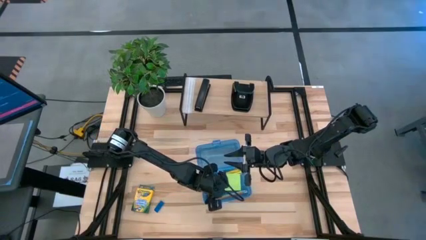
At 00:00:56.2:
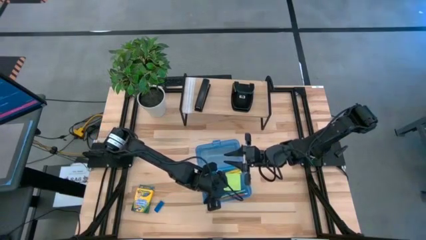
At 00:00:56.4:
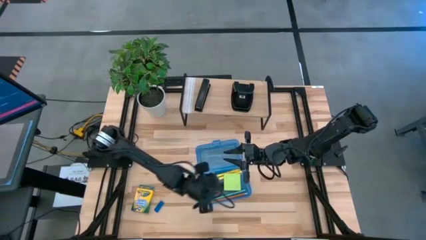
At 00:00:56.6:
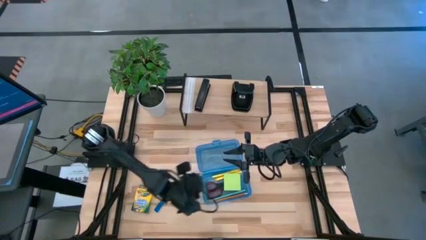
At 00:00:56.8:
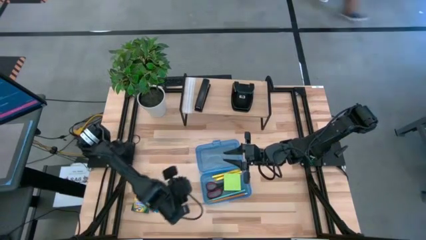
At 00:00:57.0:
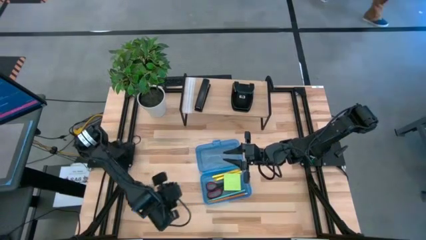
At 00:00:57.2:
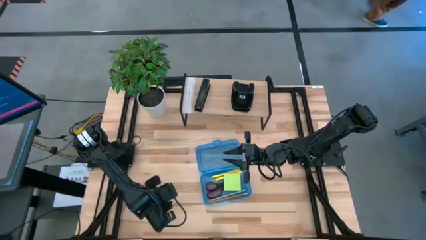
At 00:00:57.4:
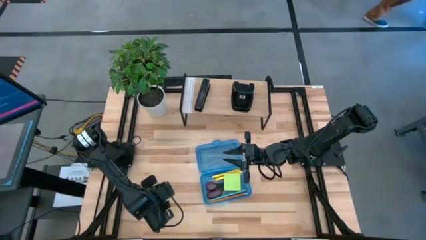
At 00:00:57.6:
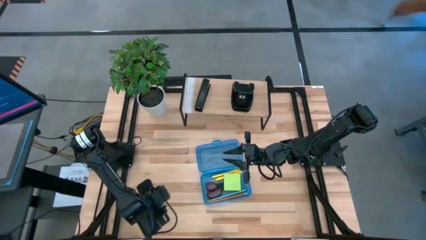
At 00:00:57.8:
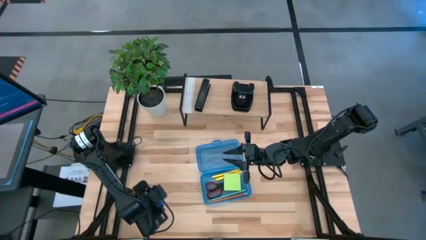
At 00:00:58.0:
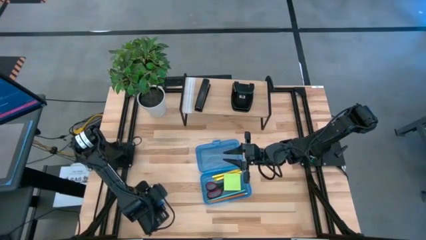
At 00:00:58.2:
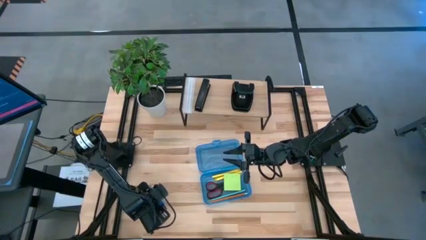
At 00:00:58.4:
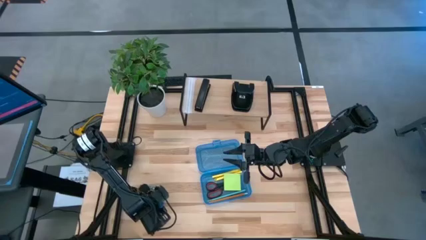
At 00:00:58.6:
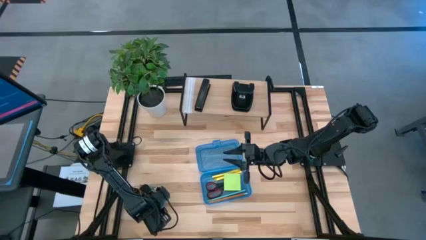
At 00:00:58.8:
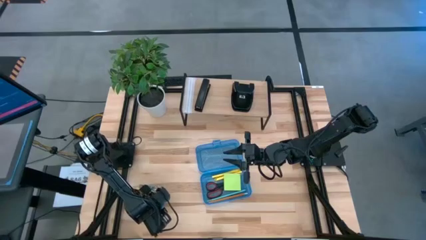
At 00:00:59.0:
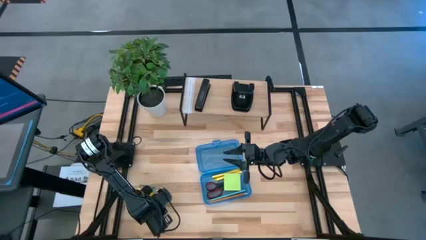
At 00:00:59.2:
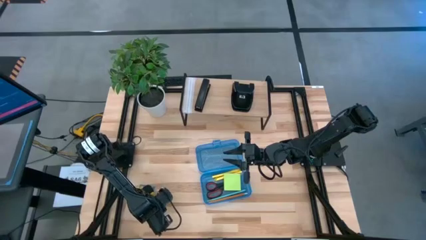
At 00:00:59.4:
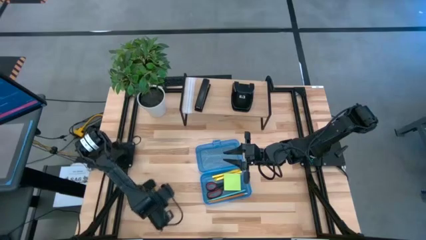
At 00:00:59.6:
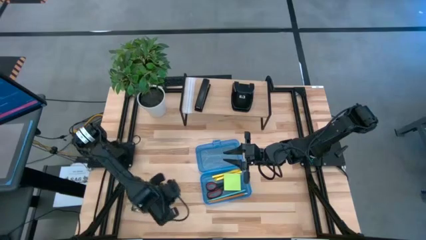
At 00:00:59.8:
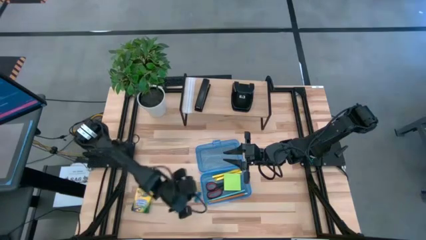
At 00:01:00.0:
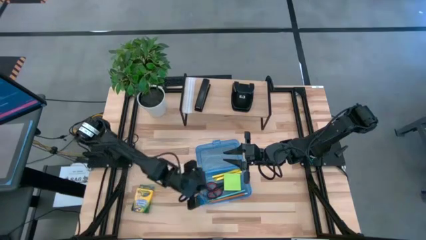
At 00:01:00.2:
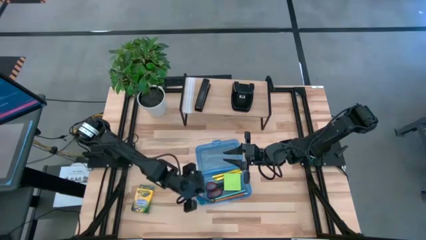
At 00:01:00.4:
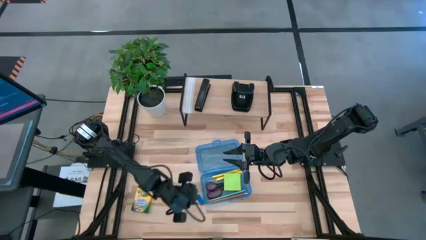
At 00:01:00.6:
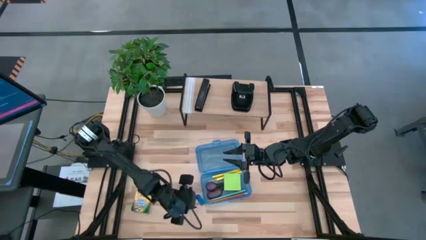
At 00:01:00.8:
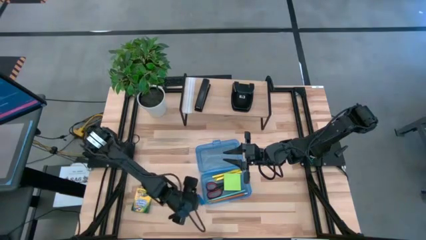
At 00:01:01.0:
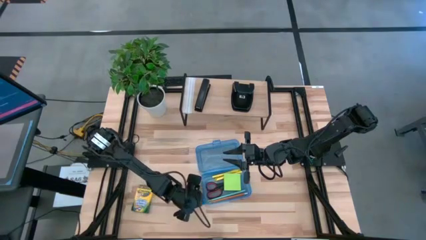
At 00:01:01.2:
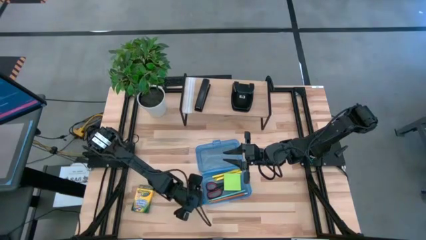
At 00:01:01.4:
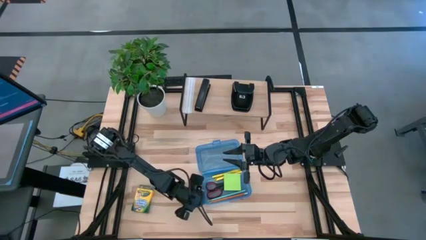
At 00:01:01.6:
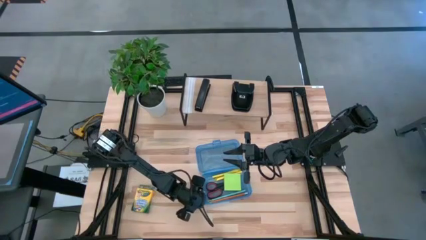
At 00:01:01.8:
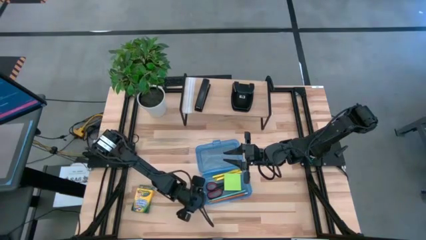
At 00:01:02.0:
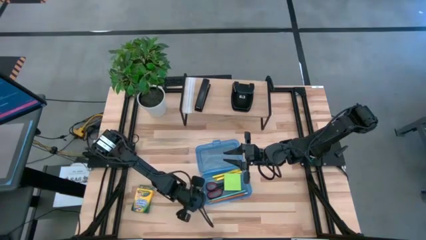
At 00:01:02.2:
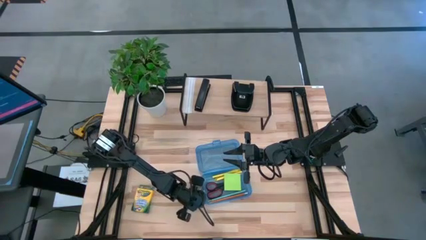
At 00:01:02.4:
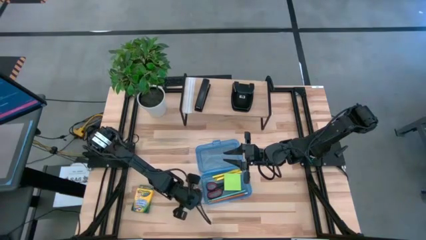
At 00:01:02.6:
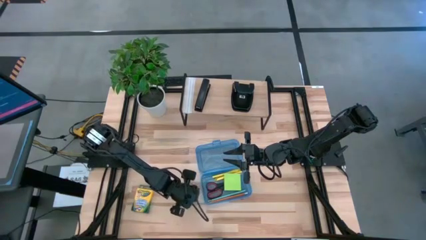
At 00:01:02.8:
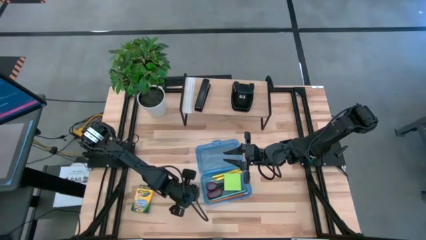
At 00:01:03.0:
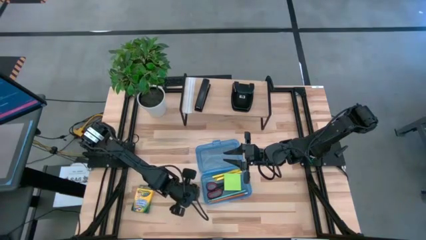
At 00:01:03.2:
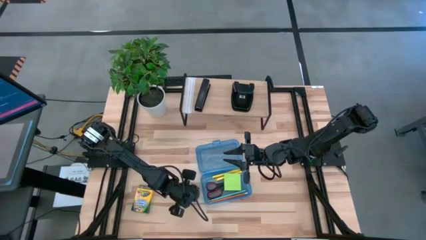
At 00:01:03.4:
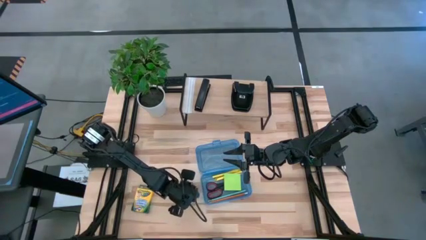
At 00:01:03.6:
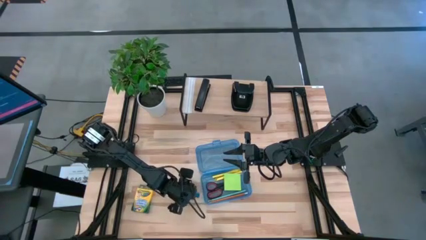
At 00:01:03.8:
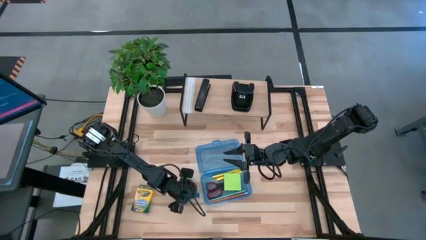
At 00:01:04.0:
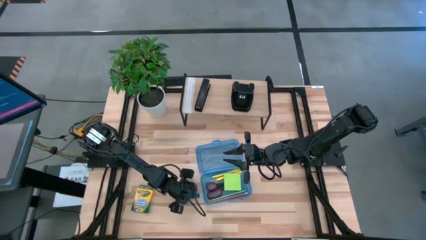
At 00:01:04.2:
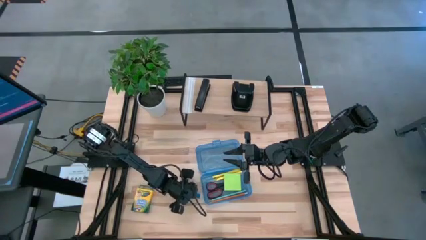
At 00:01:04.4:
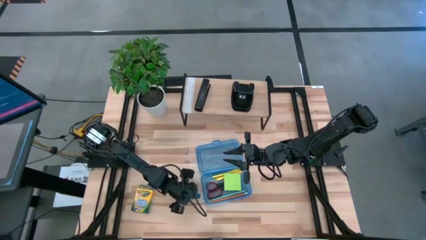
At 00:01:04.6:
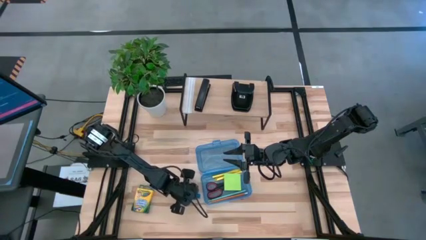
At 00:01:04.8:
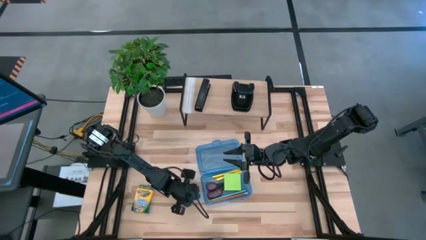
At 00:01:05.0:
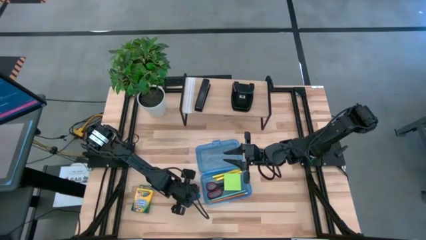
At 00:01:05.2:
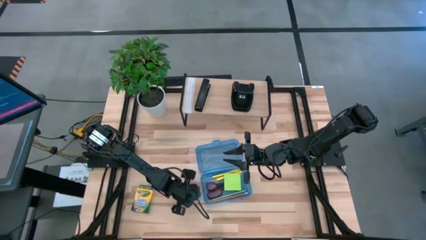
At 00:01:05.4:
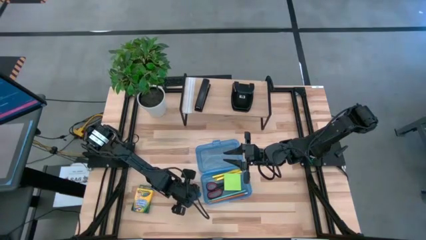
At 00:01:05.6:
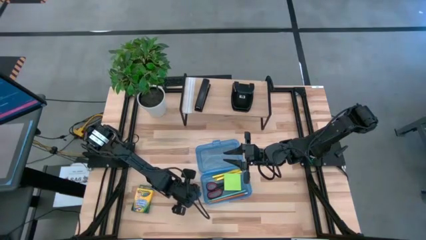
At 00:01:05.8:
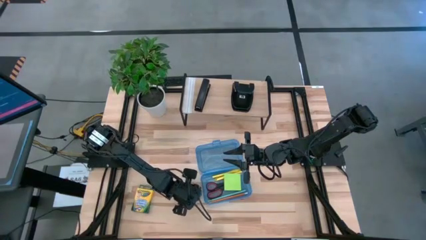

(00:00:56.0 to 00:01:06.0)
Task: Pack school essentials
Put the blue eraser into the blue supply box

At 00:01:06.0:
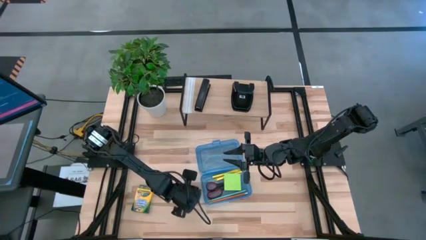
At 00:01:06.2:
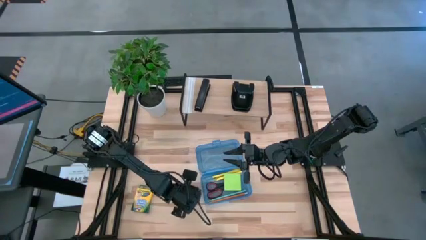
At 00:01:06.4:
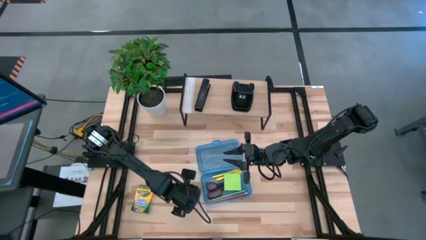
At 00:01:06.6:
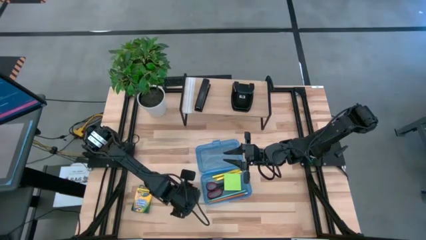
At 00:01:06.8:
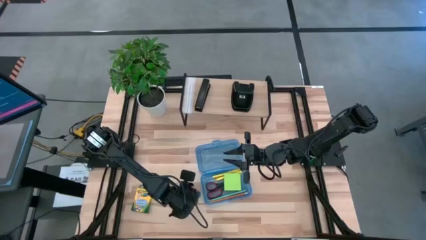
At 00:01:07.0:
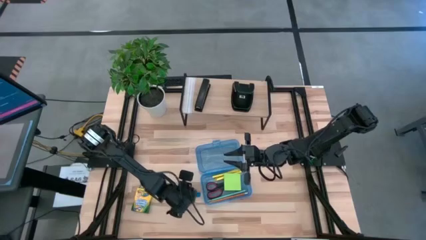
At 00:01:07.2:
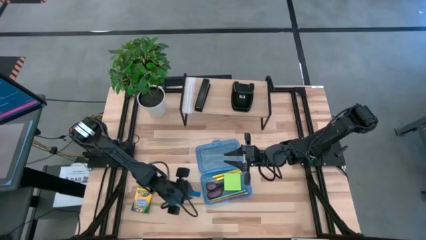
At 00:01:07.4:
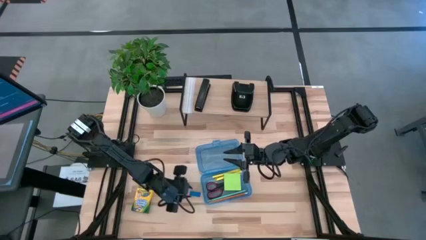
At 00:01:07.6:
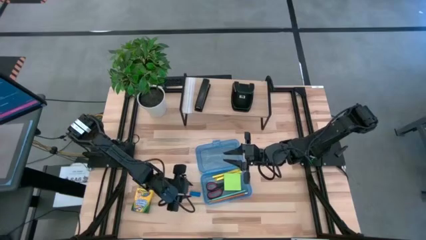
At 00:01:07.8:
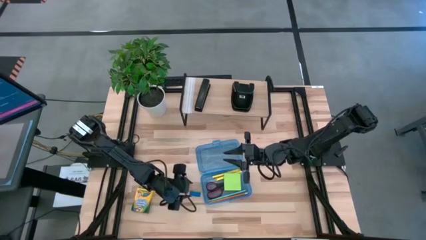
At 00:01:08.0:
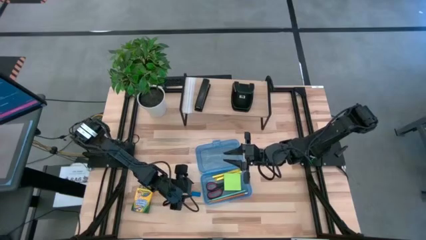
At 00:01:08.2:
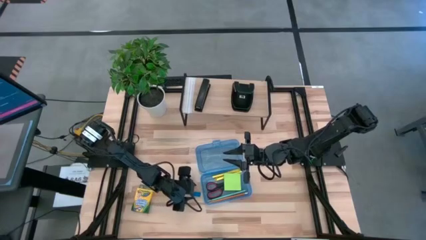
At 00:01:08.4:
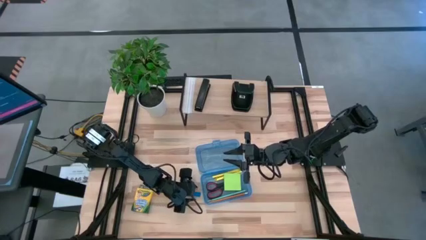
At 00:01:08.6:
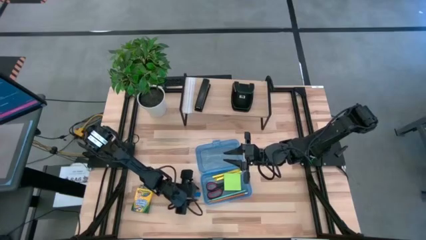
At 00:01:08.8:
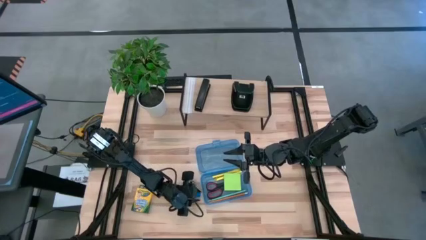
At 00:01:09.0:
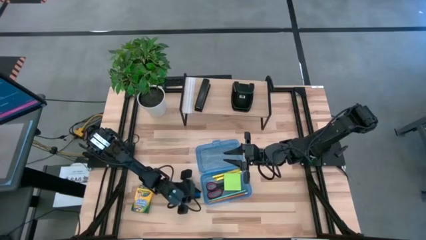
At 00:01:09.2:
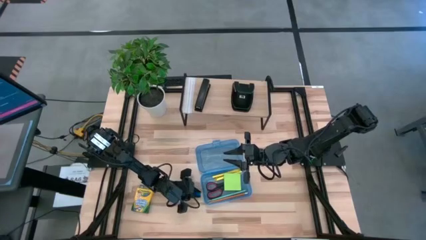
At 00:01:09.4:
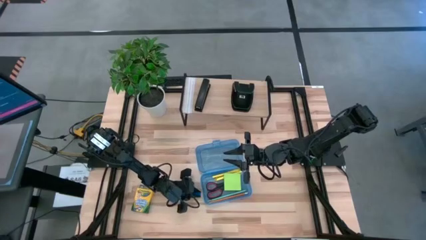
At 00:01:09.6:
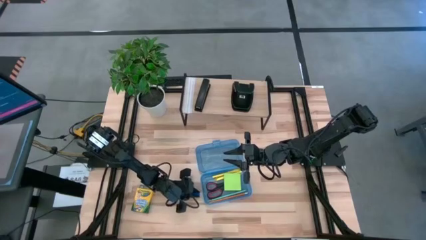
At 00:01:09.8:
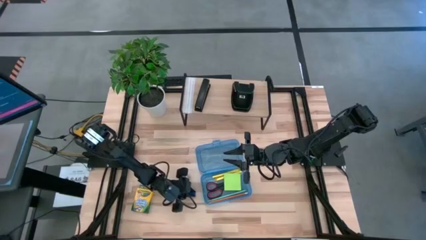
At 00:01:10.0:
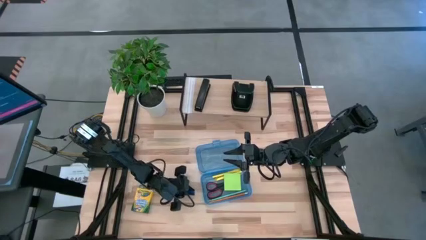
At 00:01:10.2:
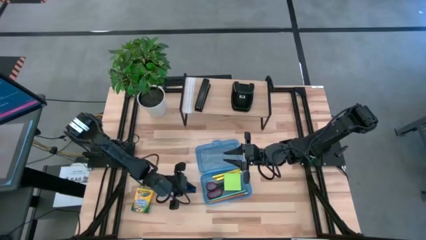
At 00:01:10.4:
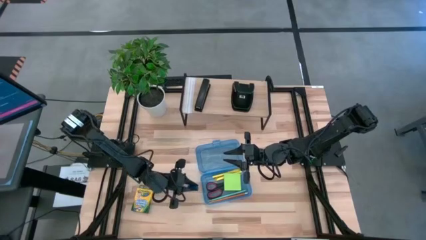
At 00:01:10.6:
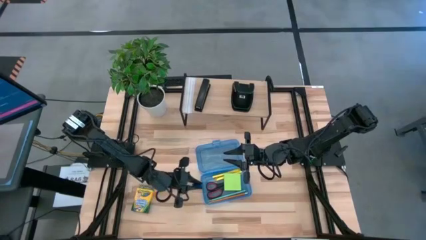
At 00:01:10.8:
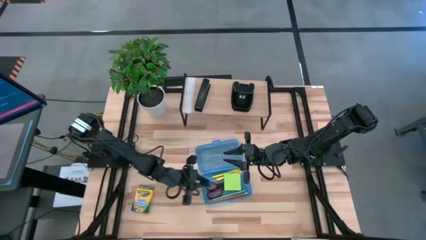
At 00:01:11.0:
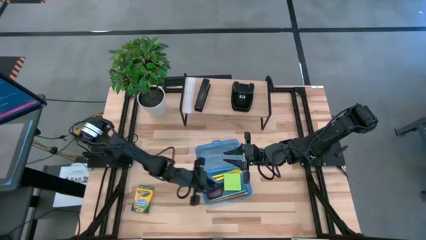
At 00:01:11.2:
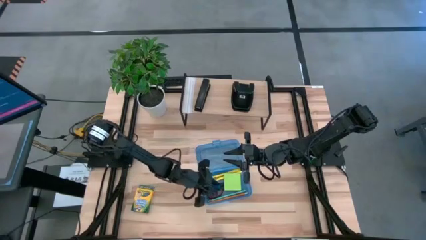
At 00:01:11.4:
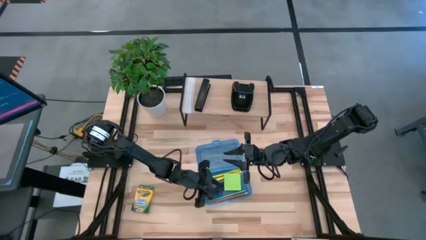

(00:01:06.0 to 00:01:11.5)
Put the blue eraser into the blue supply box
